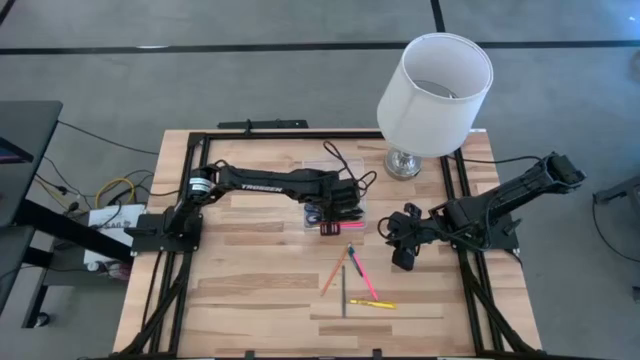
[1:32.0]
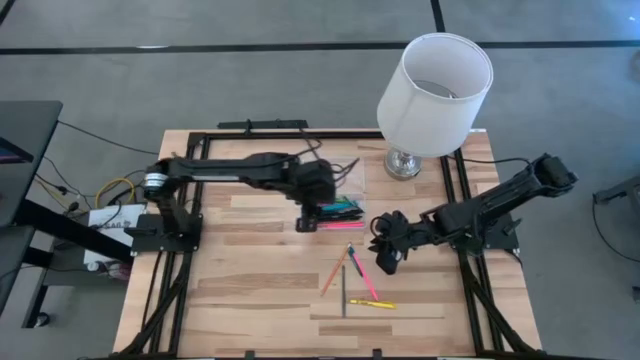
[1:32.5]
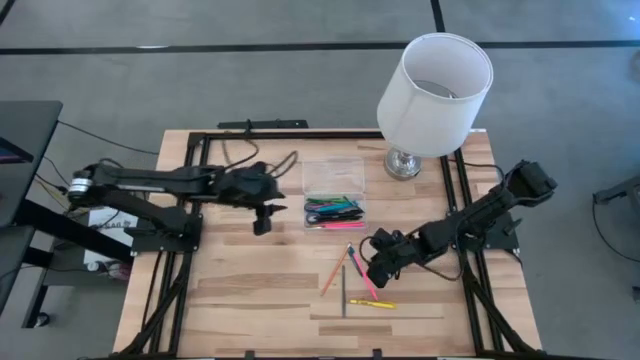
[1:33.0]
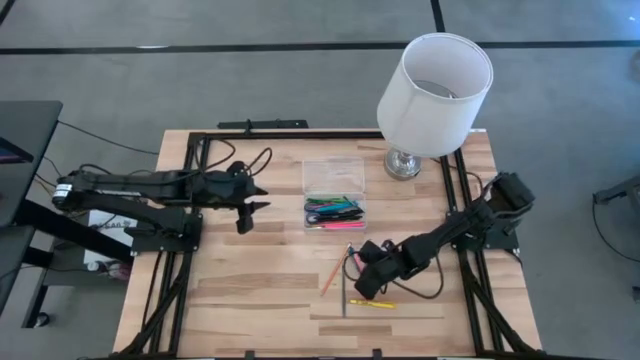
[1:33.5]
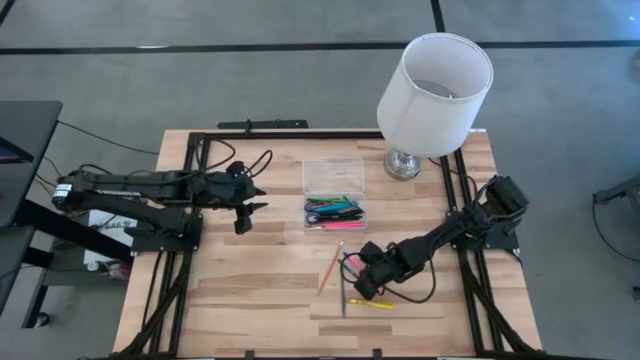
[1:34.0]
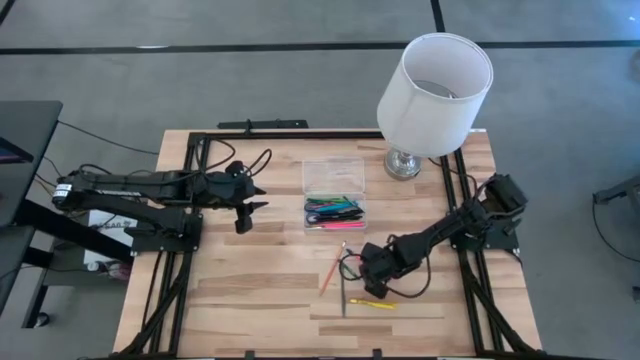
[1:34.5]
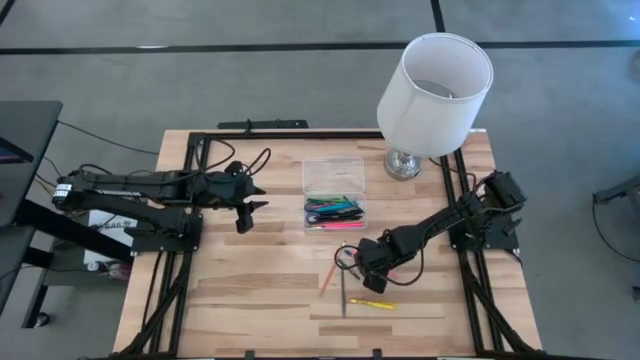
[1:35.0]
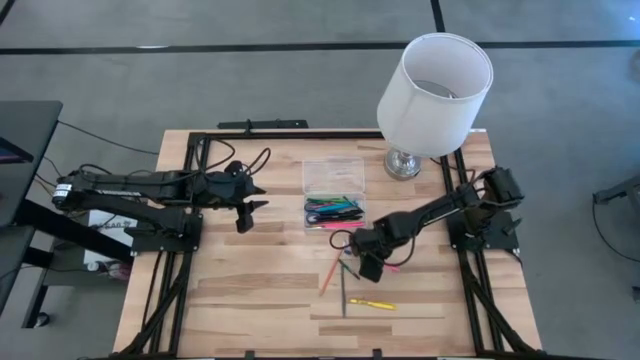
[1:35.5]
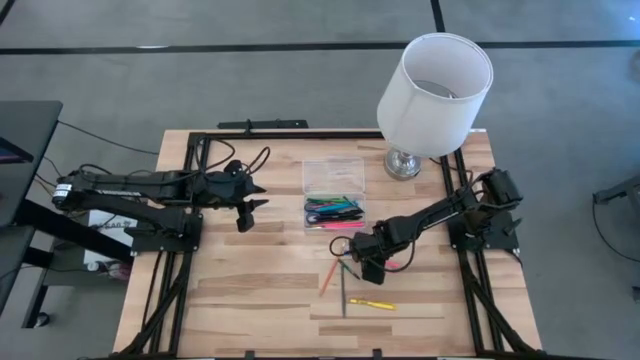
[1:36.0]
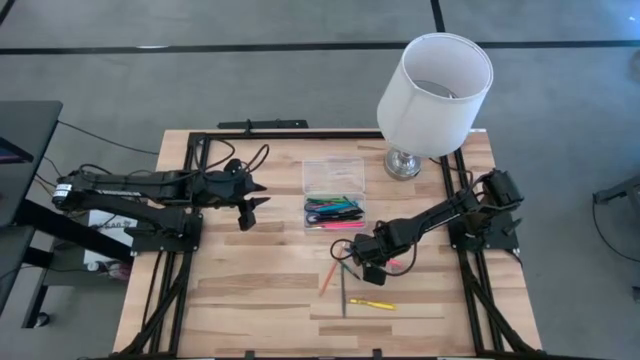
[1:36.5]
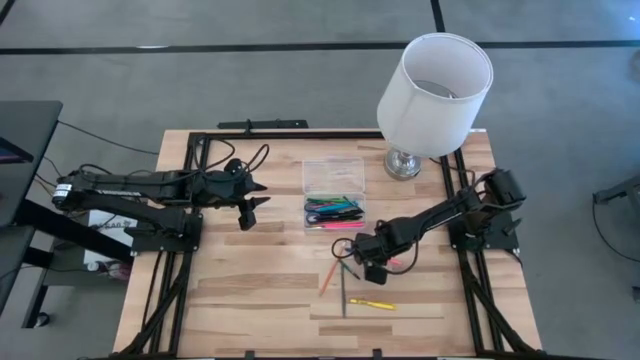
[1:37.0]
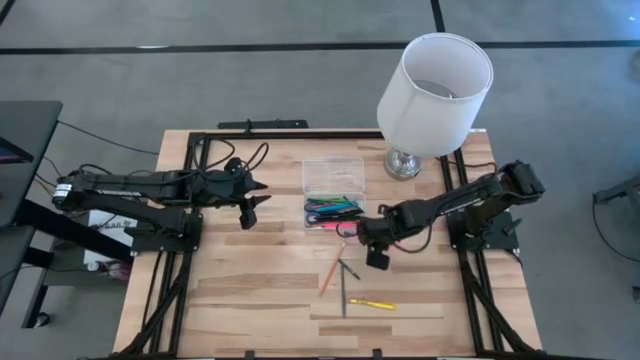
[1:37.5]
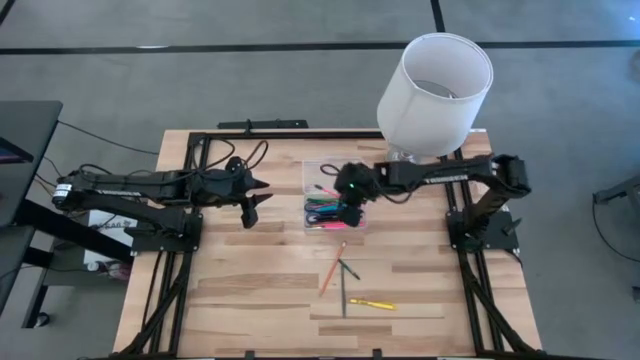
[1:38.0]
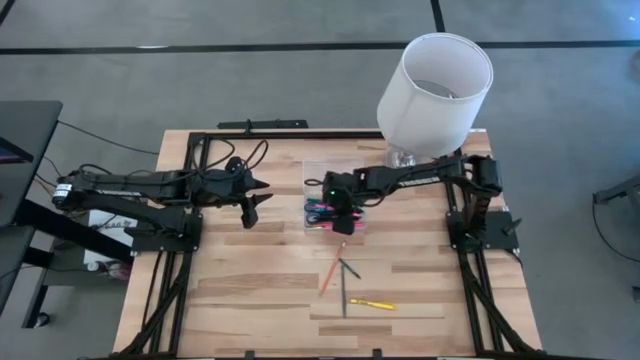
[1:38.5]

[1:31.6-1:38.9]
Task: Pick & place school supplies into a supply box
Put the pink pencil into the transparent supply box

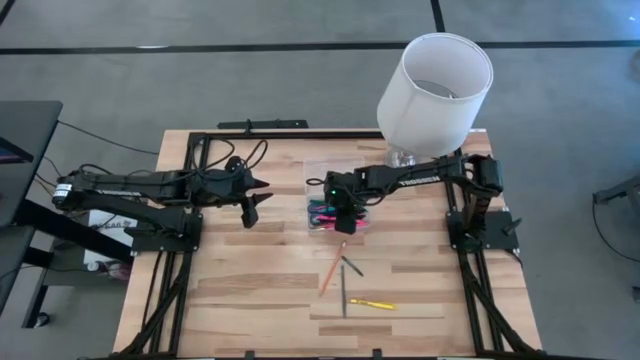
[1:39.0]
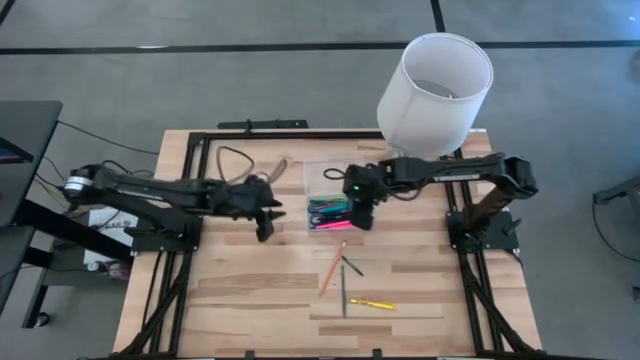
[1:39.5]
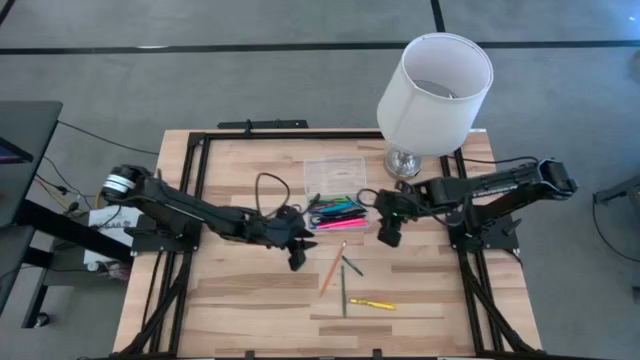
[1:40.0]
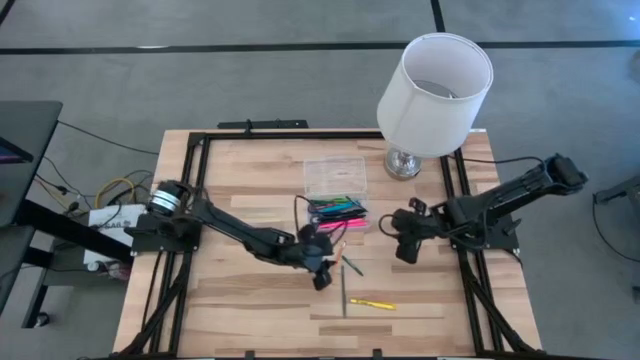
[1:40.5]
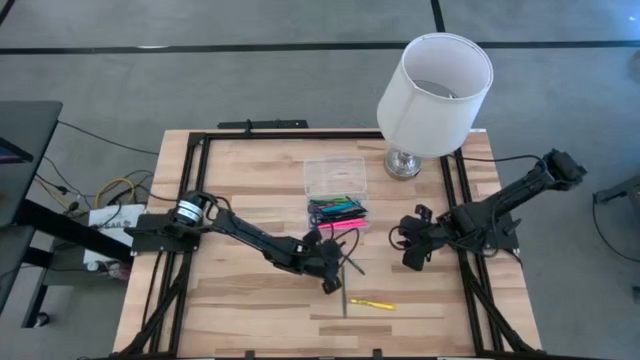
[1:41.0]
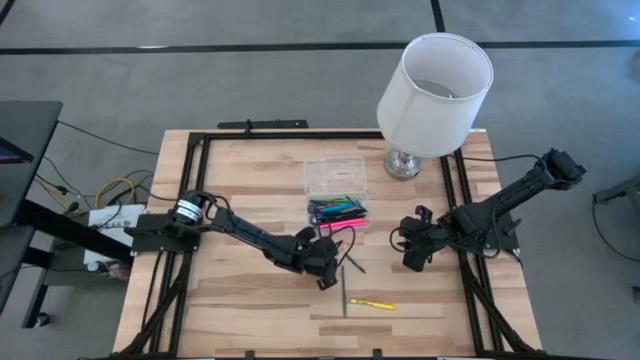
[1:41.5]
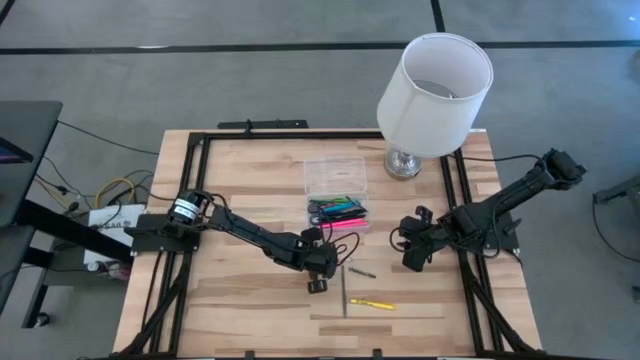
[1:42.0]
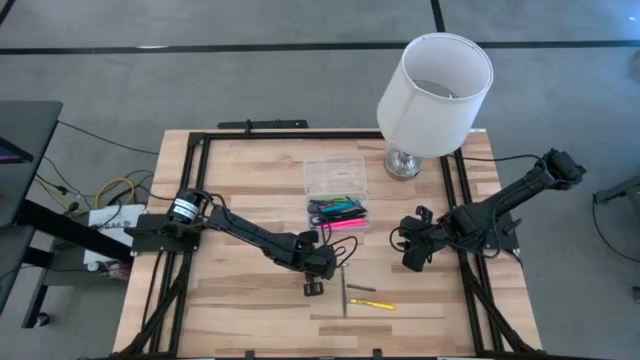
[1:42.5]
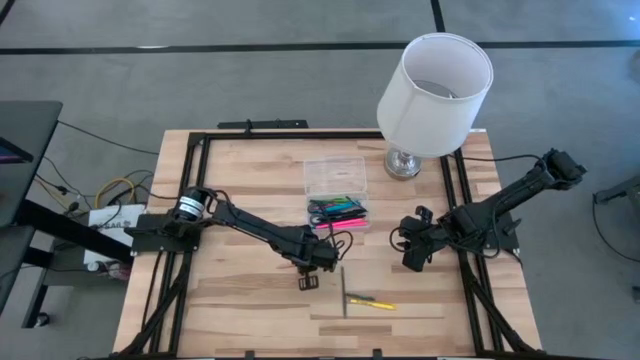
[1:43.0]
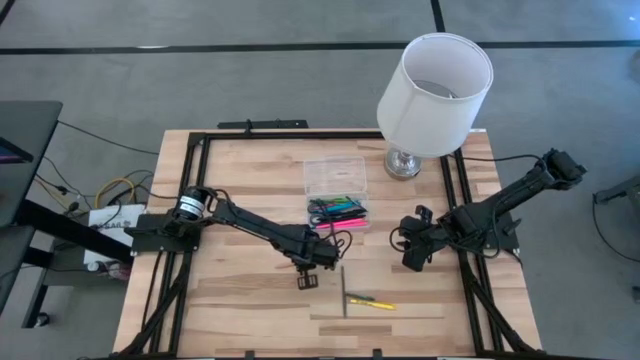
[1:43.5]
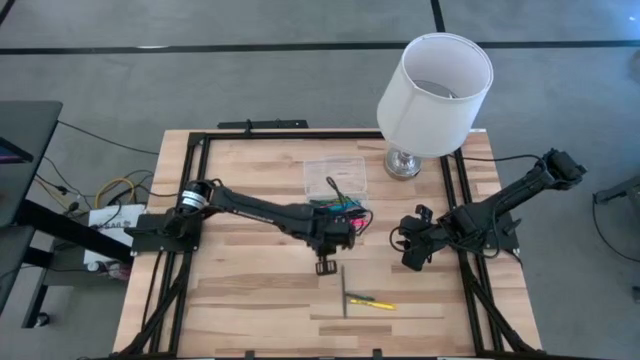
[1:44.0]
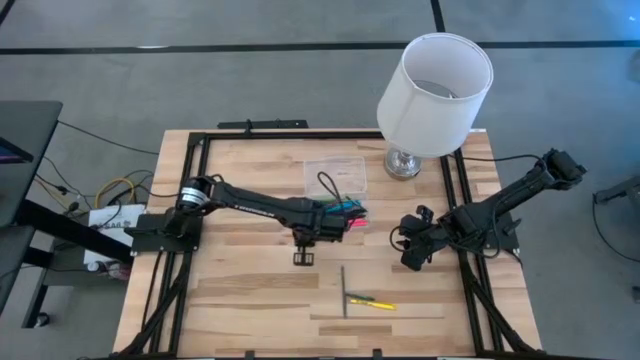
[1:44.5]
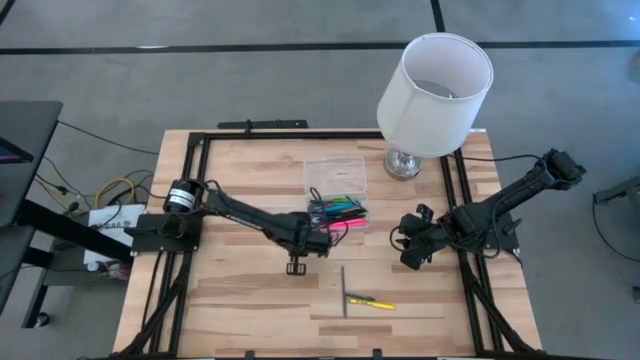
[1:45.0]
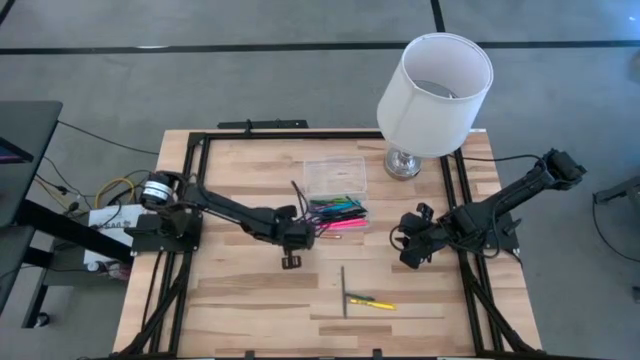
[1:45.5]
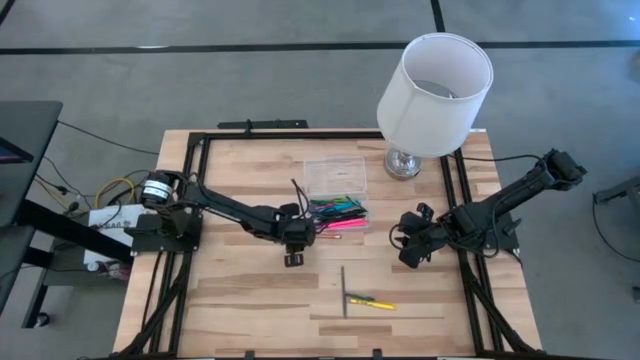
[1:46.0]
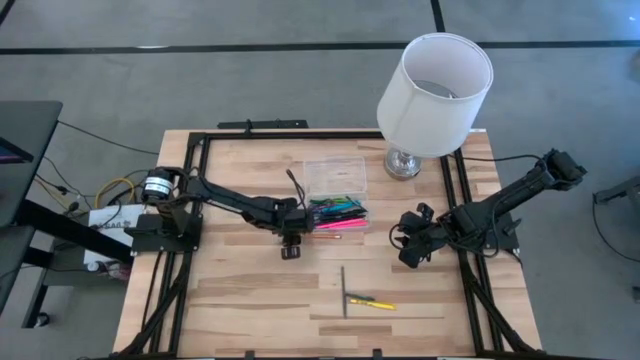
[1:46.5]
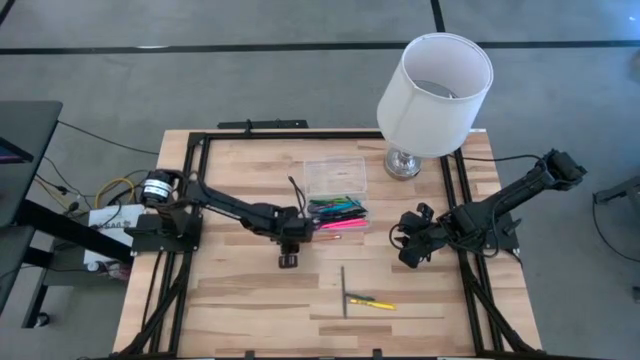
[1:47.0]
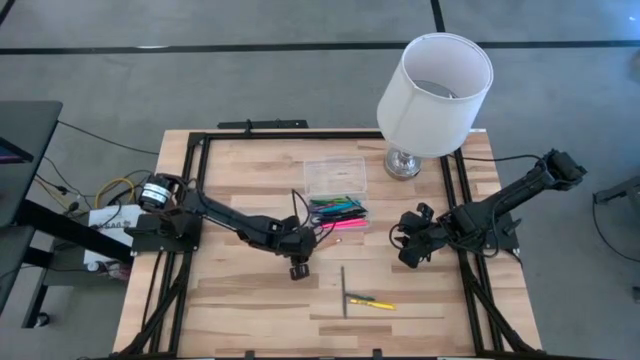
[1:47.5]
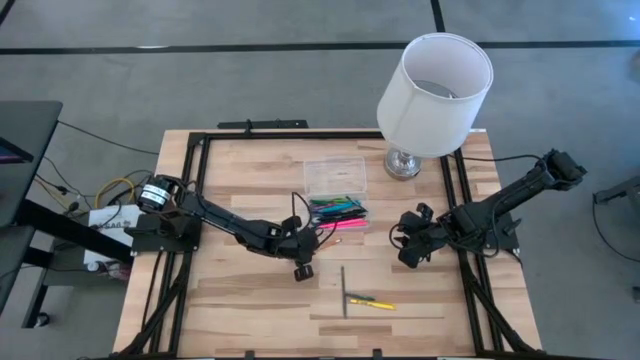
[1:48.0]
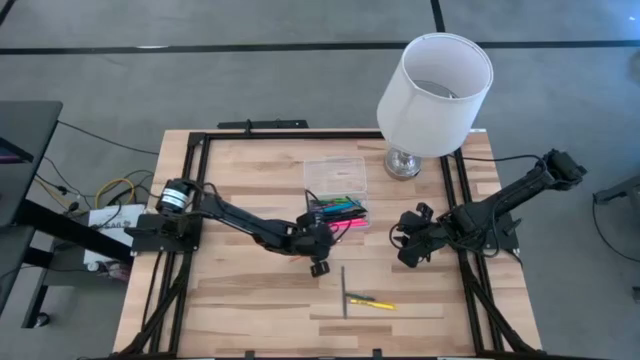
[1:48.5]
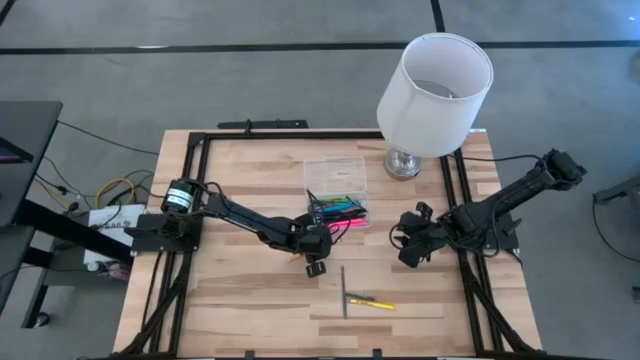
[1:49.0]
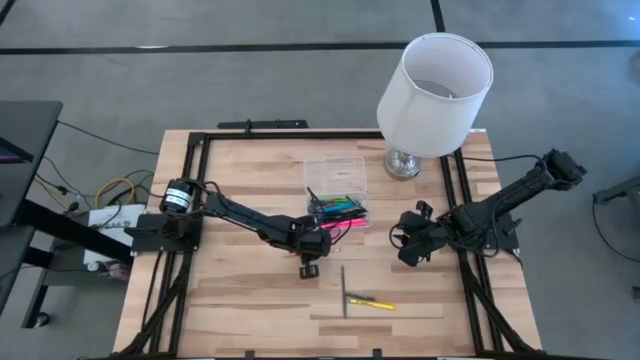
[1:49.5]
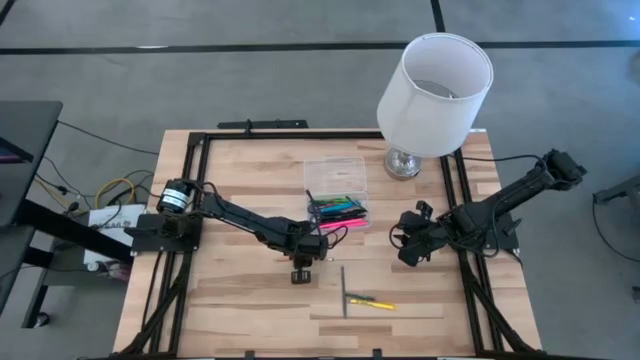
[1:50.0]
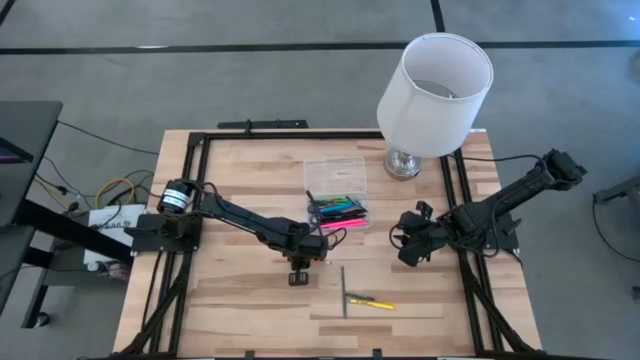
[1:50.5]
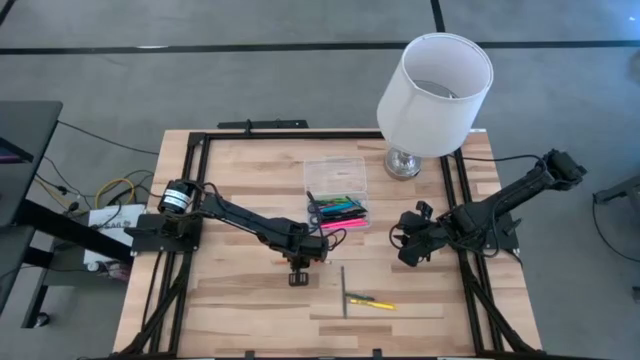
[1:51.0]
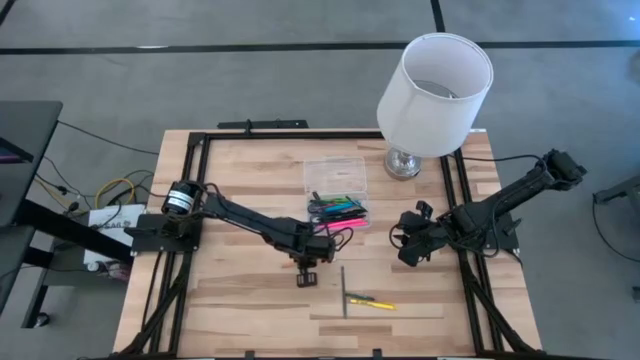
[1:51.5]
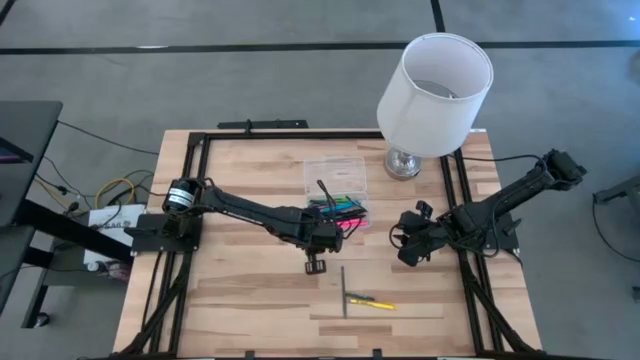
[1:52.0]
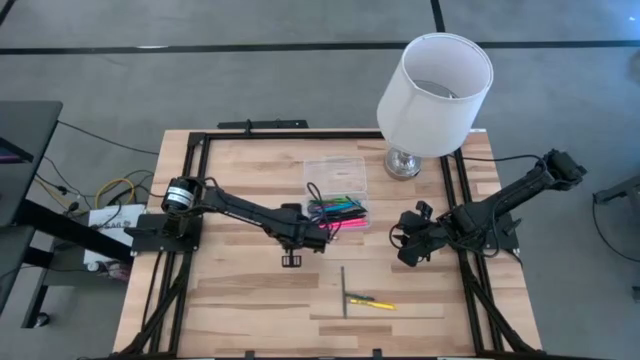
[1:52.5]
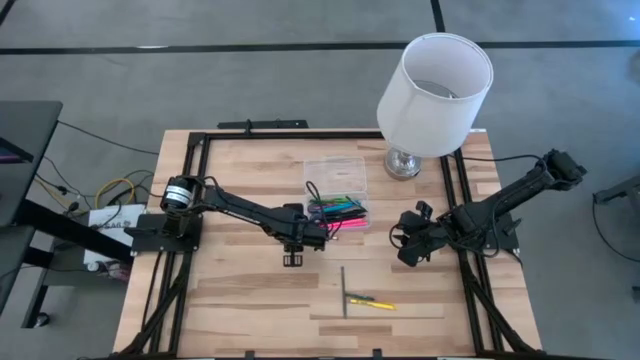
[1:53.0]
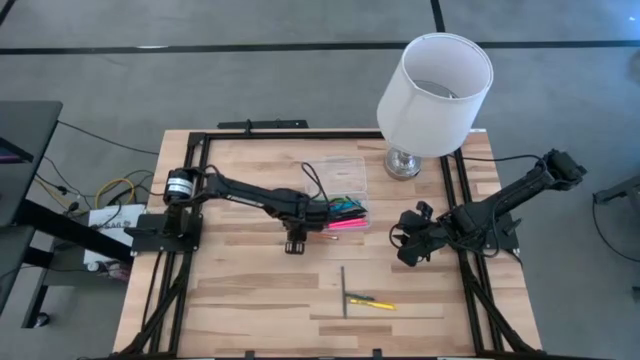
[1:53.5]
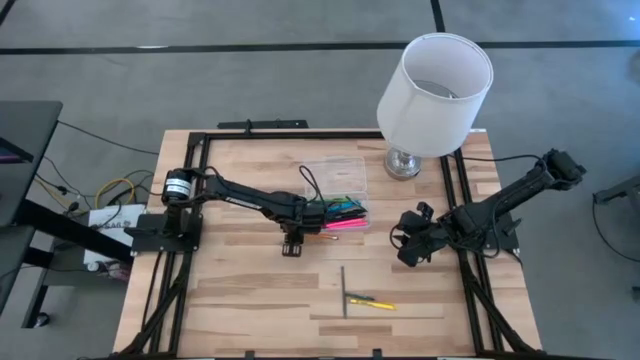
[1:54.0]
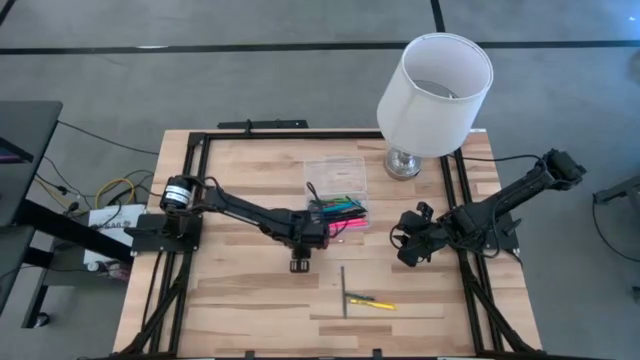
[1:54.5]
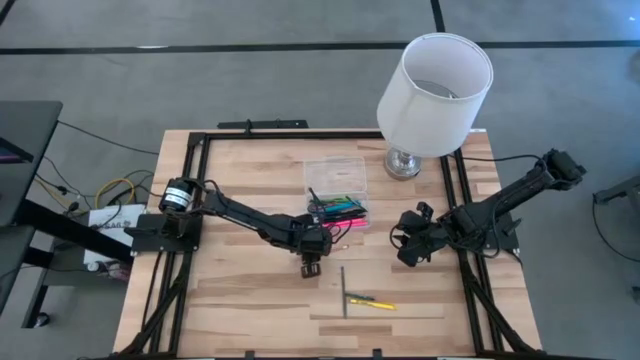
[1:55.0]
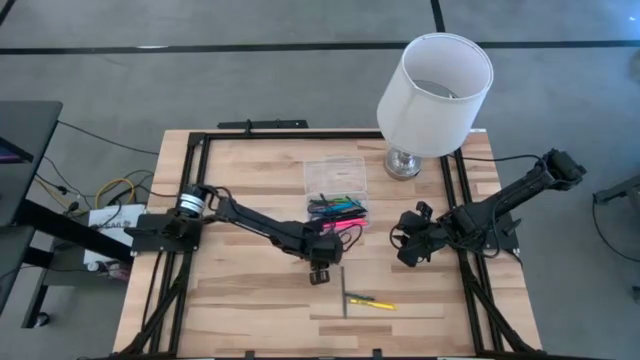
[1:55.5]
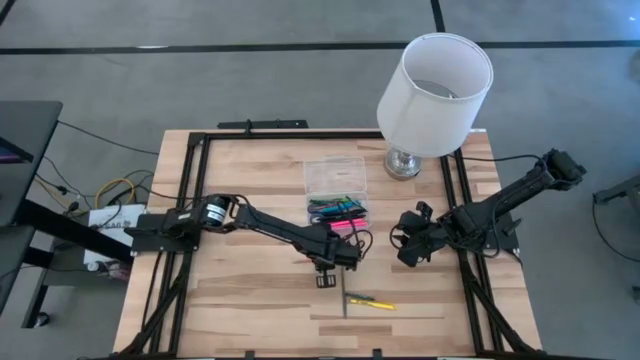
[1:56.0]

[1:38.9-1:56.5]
Put the yellow pencil into the transparent supply box
